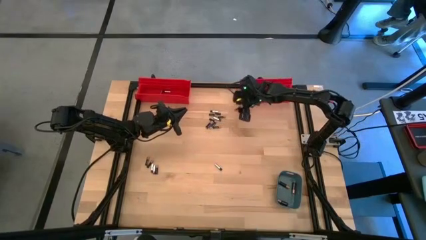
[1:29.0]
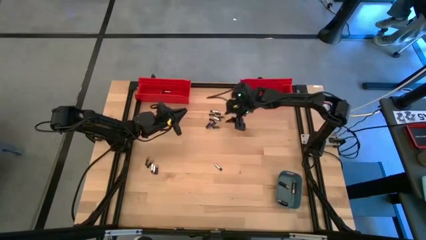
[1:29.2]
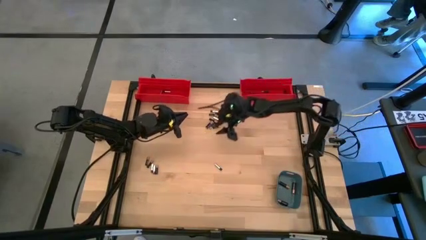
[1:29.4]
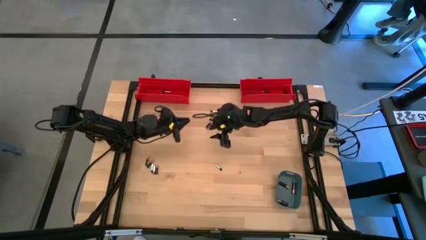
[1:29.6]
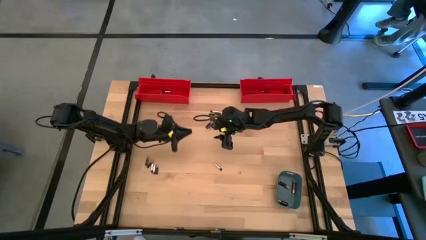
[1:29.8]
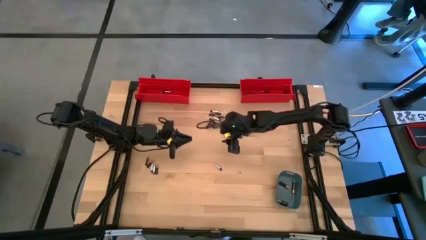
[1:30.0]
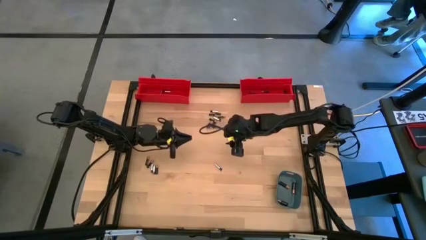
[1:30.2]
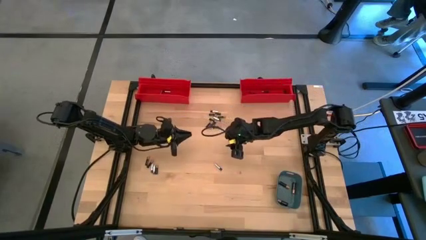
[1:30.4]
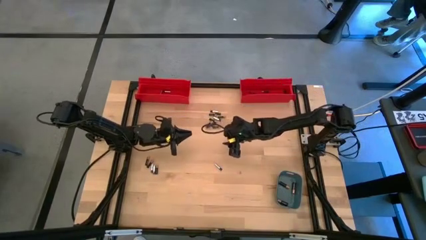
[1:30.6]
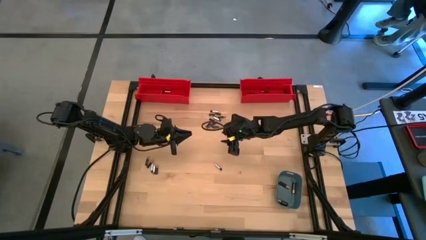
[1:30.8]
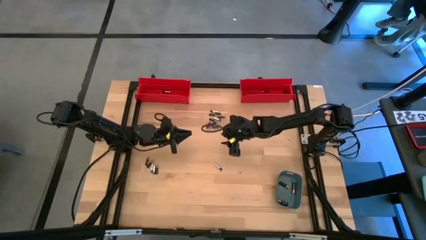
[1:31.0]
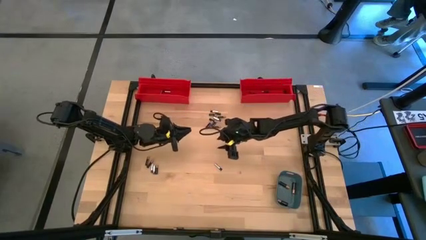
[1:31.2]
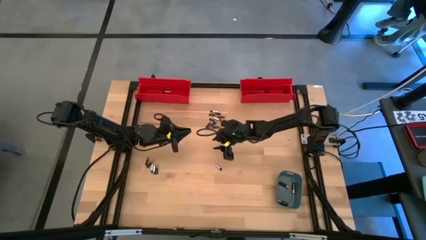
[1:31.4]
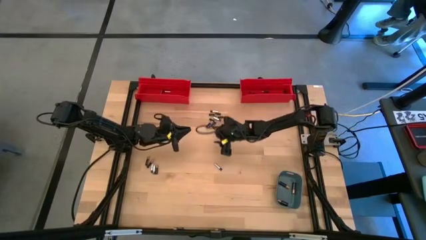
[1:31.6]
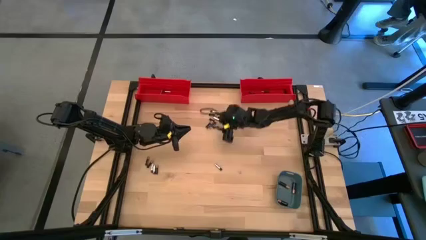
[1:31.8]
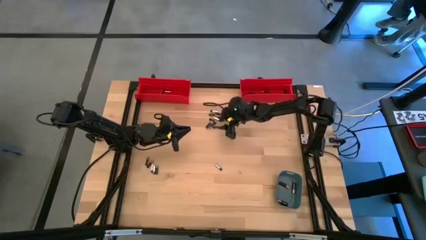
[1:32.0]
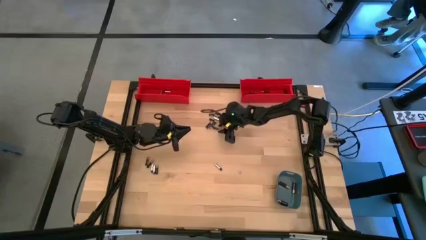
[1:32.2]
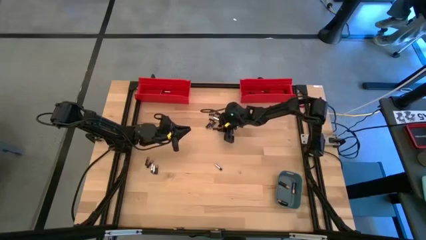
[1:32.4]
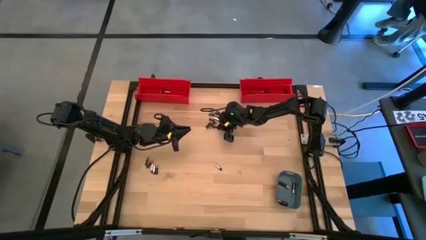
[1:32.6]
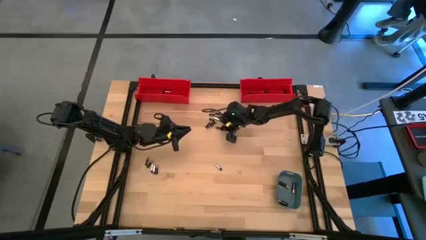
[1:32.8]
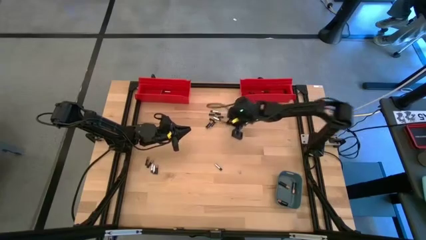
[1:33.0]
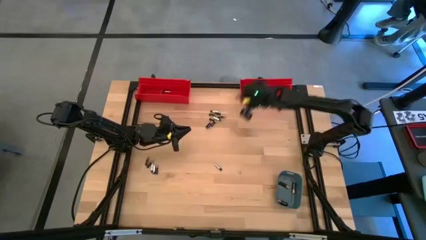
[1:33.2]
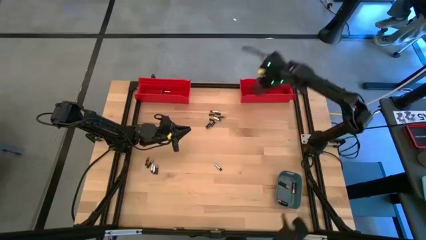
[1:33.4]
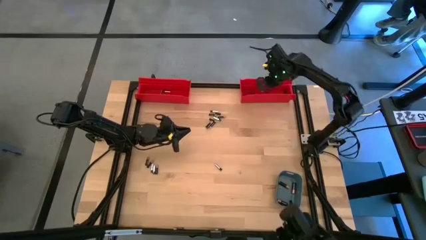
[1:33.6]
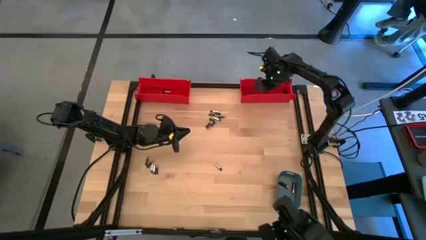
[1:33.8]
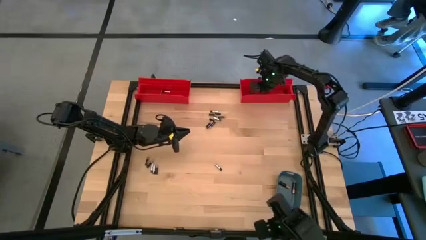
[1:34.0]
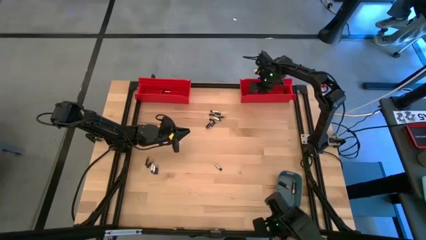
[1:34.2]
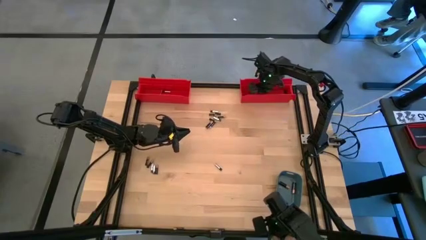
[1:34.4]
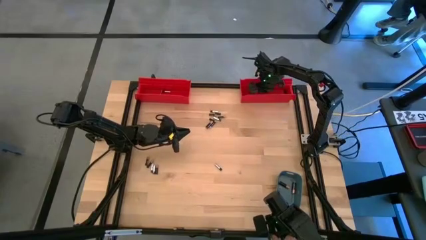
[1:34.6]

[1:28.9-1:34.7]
Task: Sort batteries
Put the small black battery into the right red bin

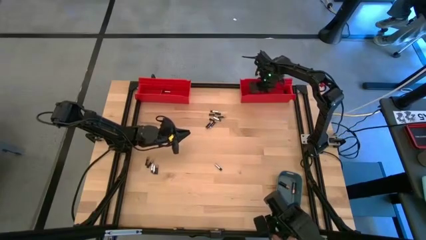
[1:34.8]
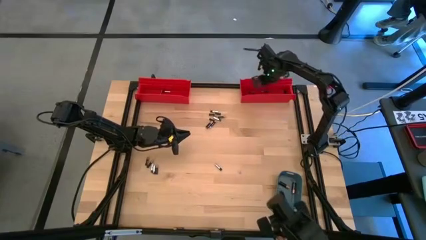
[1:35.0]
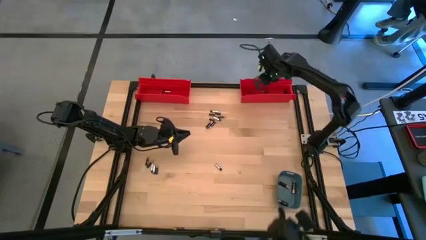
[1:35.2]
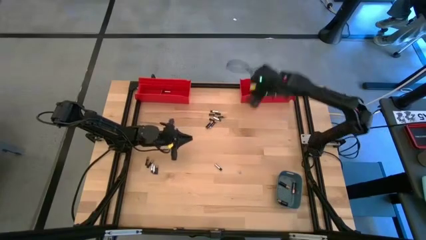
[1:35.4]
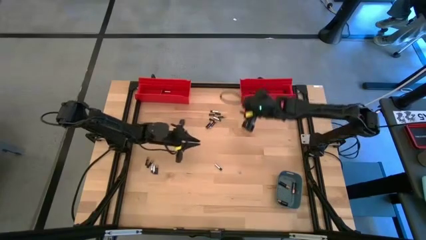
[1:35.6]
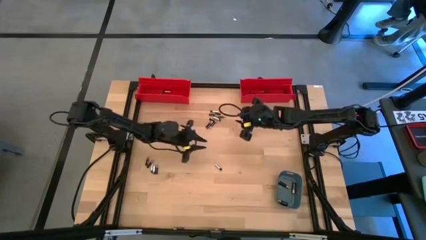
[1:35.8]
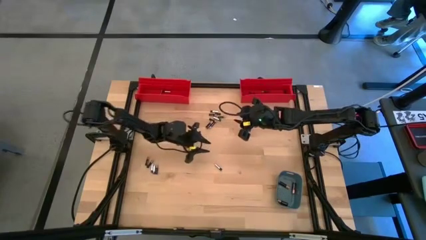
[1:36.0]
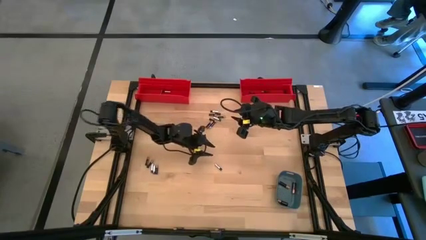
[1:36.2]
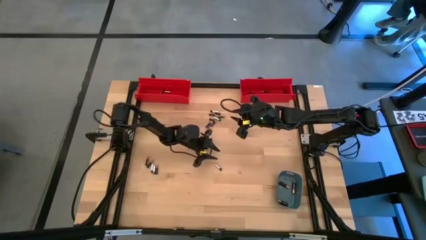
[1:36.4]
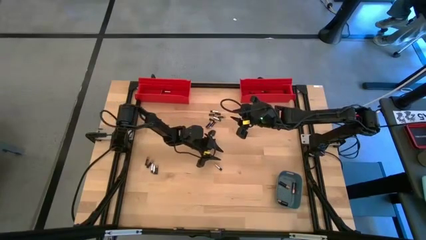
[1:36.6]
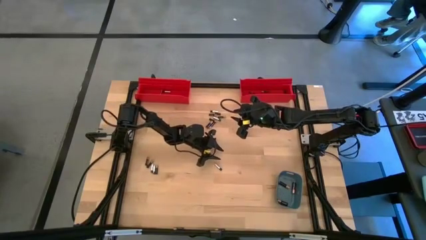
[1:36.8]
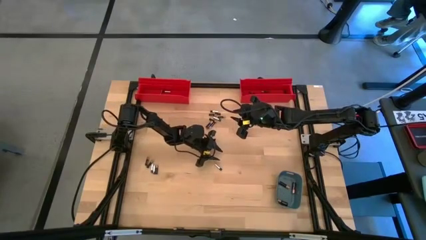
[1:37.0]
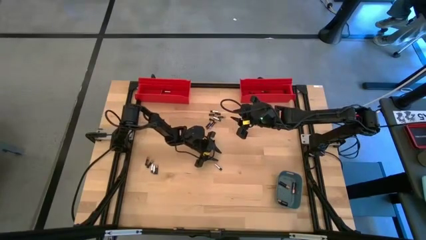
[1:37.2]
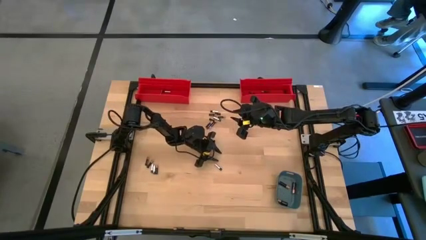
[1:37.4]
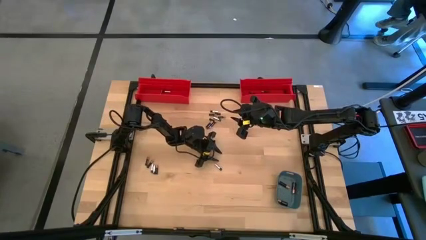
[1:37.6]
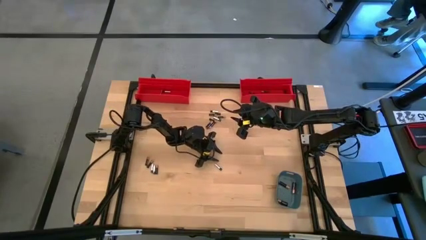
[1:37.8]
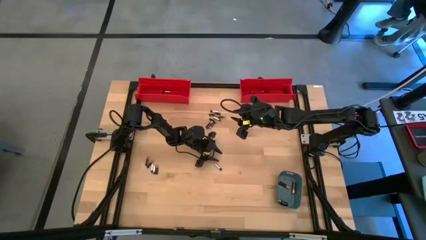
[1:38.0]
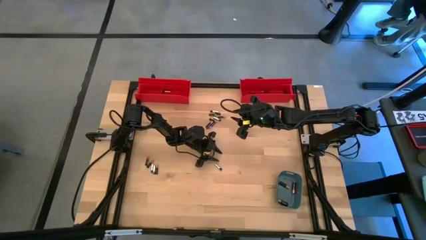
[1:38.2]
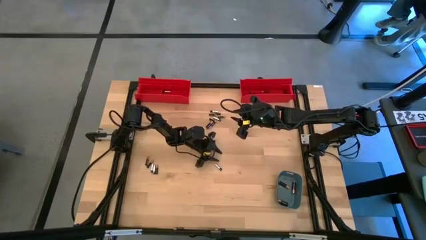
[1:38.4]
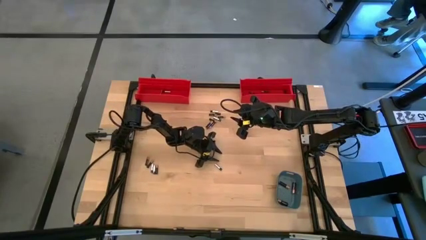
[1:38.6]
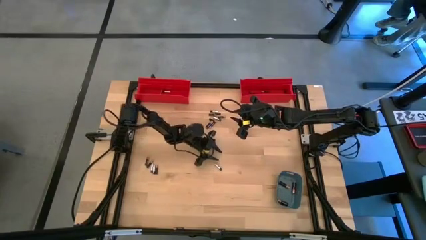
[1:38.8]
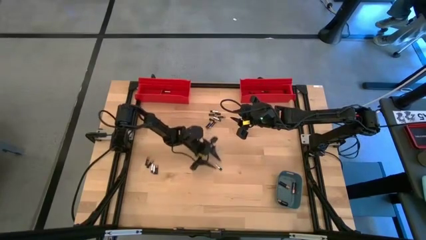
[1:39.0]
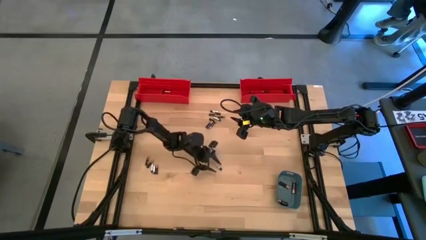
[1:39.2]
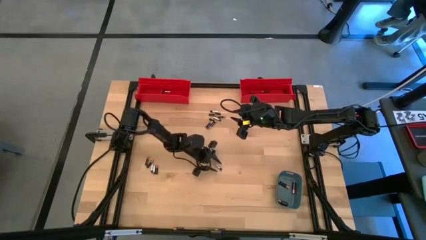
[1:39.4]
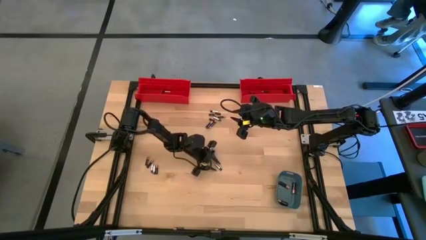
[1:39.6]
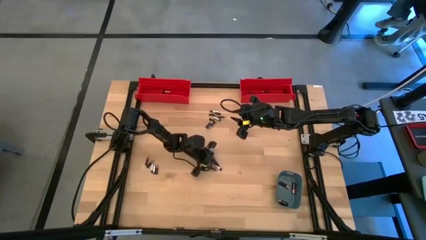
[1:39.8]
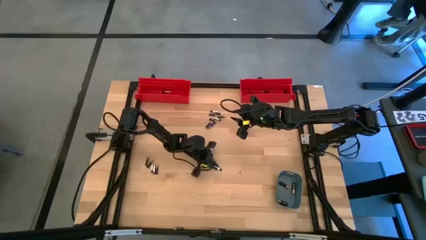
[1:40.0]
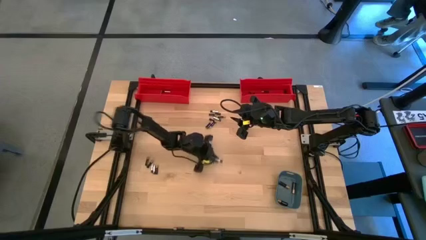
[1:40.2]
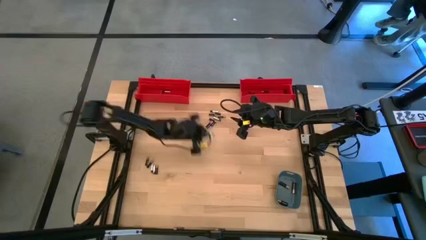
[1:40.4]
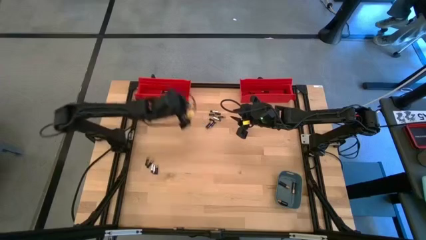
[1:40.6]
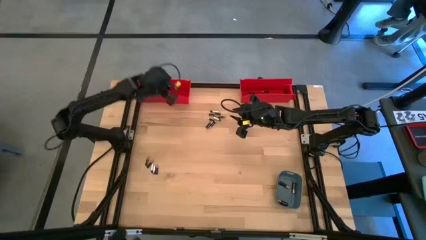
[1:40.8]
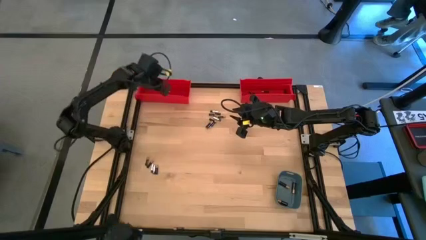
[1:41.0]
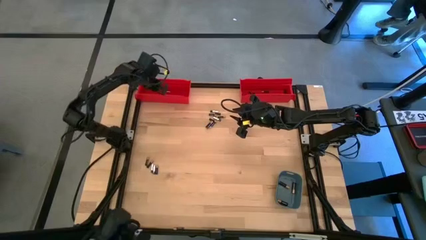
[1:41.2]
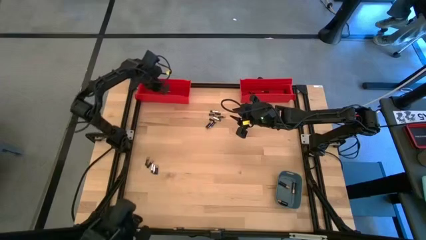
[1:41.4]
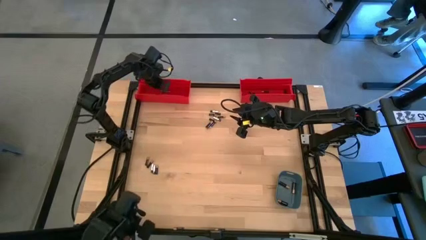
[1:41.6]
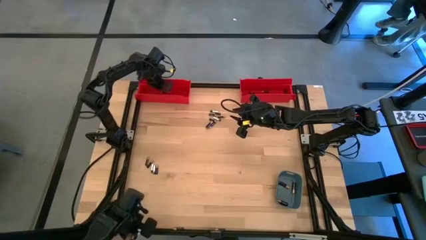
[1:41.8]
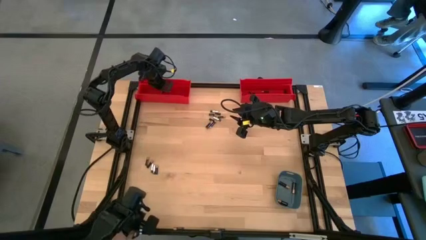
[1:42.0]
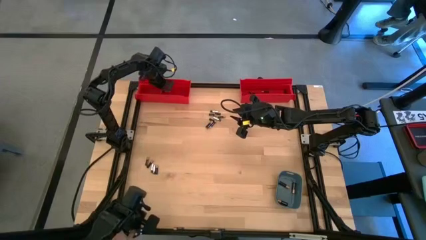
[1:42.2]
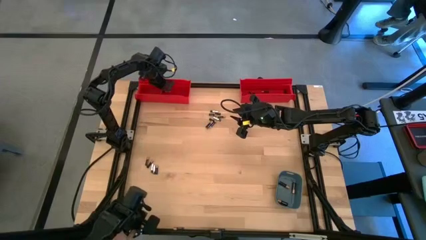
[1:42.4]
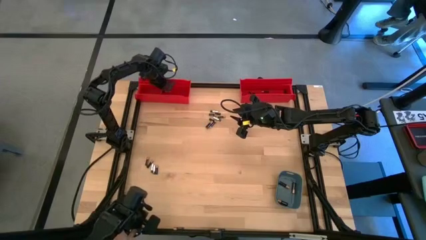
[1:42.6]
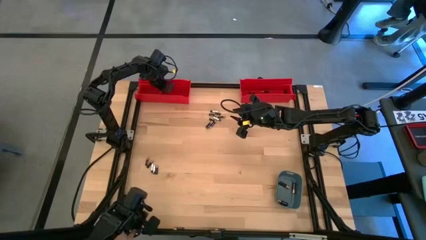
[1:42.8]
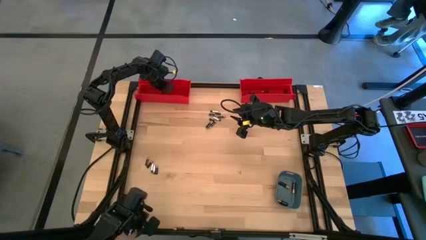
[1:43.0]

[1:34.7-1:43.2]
Put the small silver battery into the left red bin

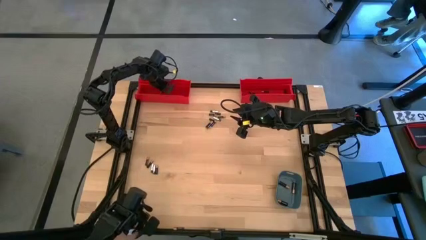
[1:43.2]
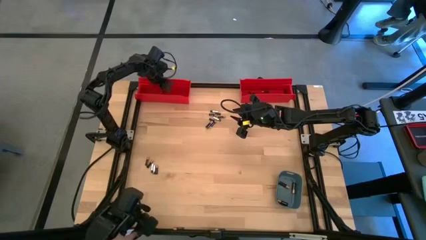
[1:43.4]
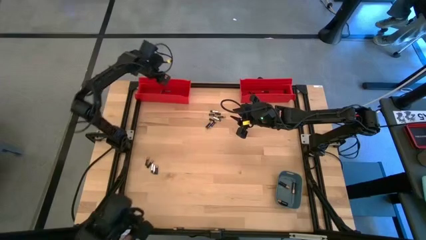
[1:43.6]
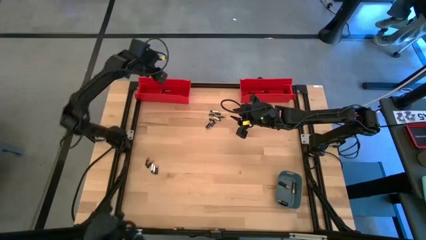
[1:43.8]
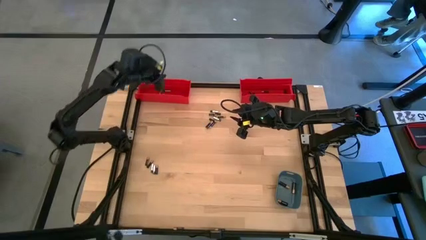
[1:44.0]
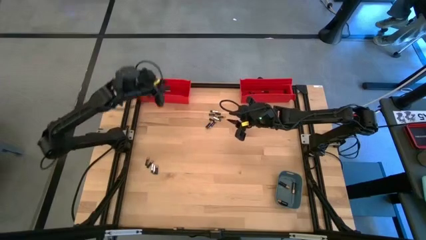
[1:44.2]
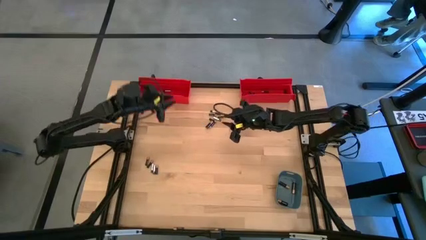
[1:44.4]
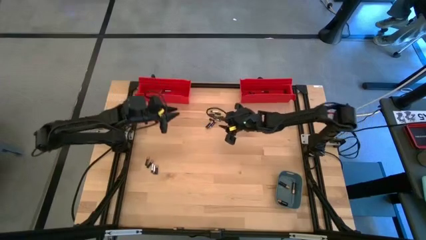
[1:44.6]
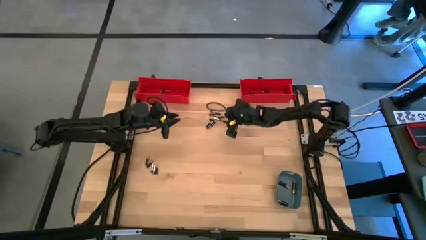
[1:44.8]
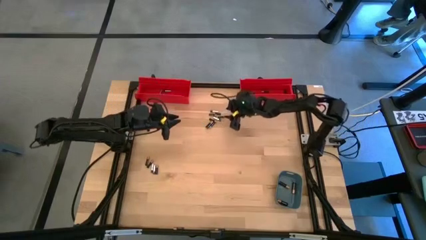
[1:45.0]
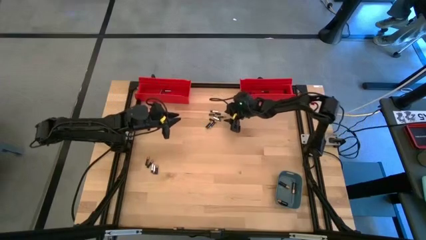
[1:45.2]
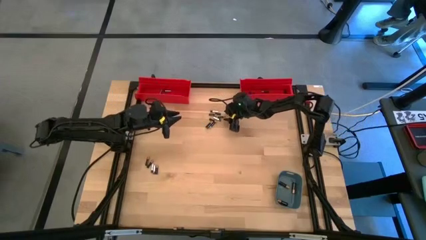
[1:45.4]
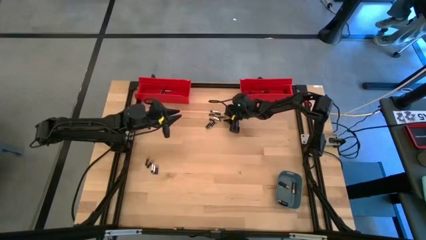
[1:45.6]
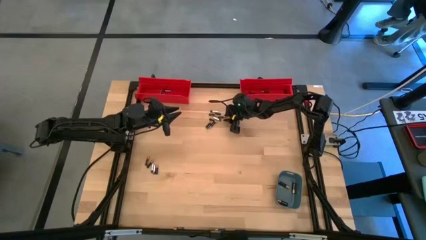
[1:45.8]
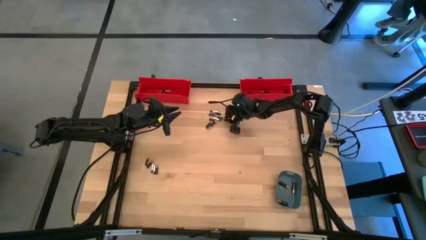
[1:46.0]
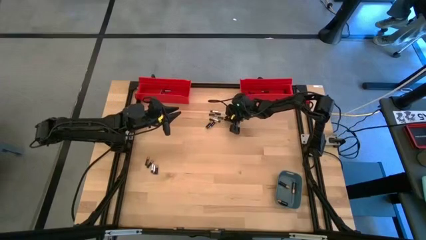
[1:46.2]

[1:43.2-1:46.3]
Put the small black battery into the right red bin
